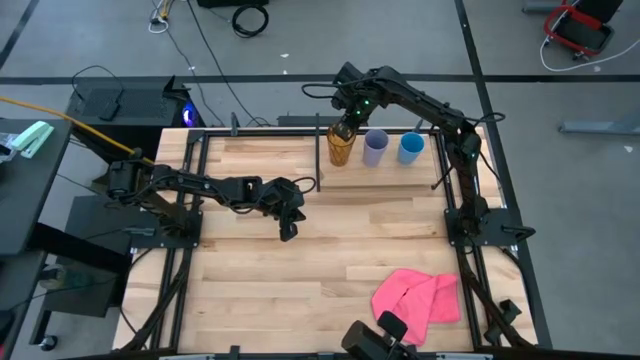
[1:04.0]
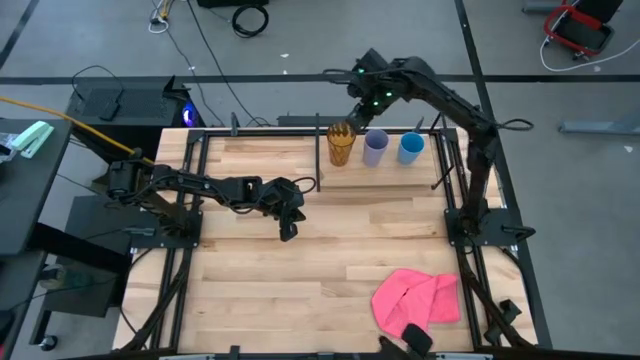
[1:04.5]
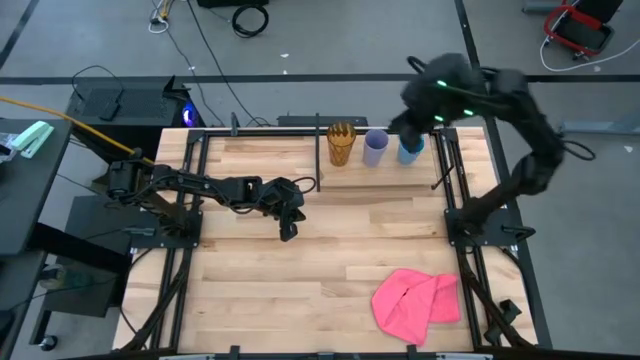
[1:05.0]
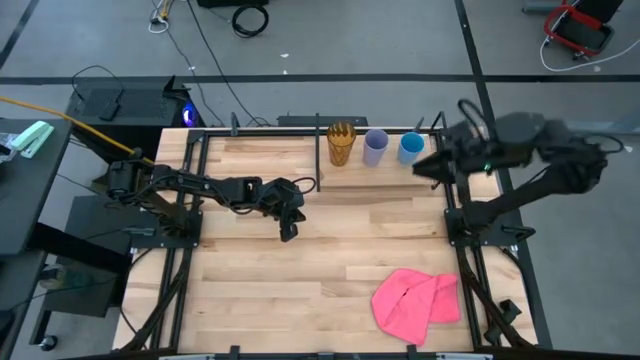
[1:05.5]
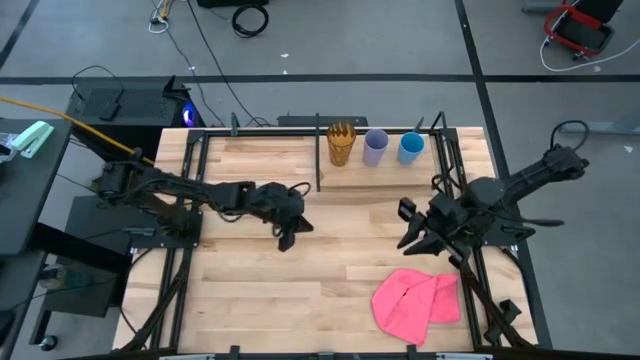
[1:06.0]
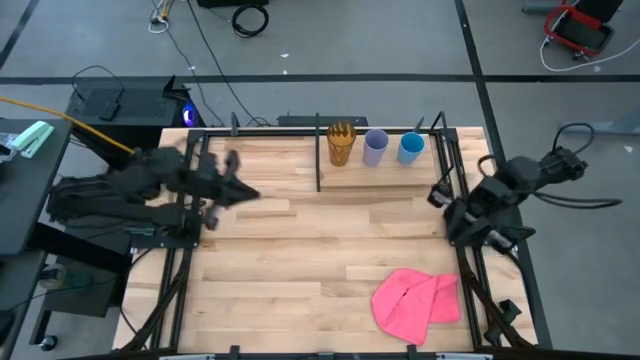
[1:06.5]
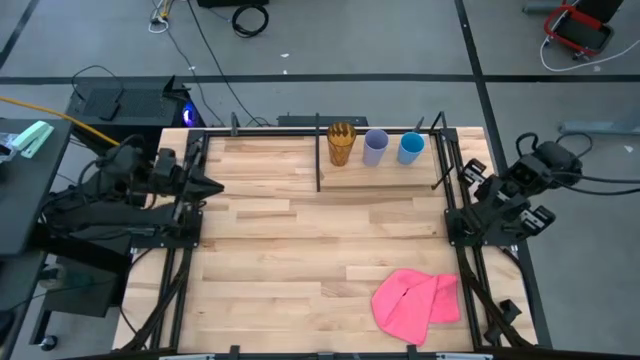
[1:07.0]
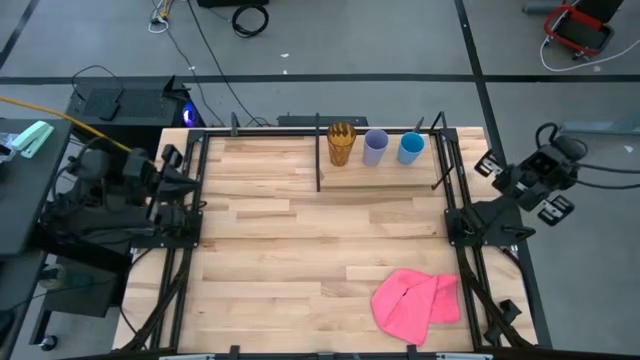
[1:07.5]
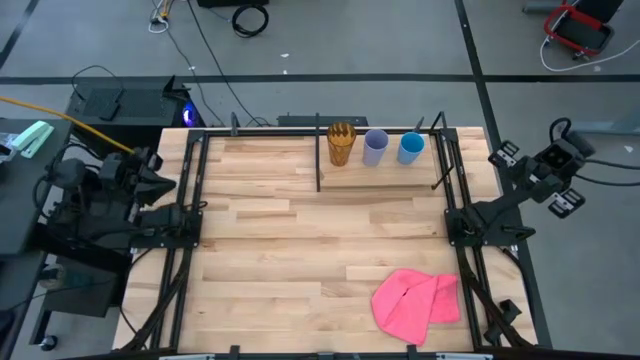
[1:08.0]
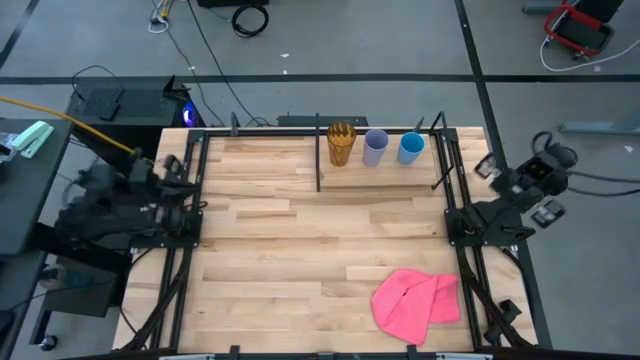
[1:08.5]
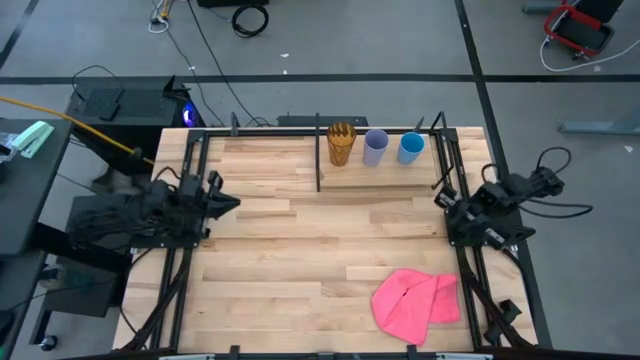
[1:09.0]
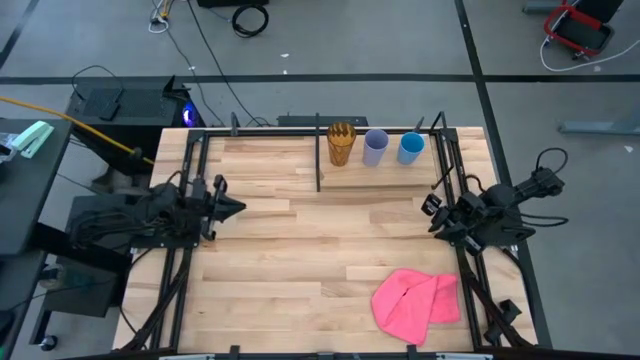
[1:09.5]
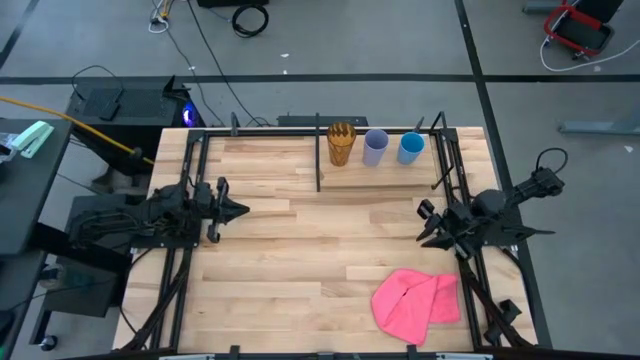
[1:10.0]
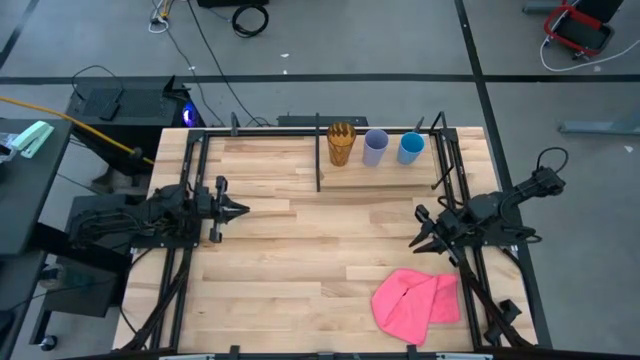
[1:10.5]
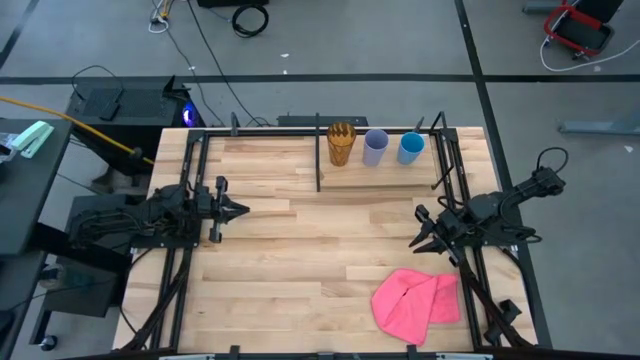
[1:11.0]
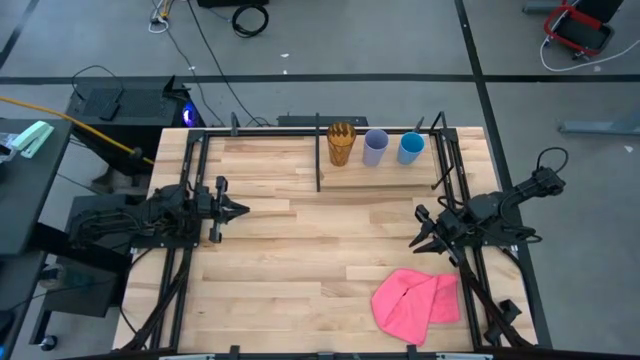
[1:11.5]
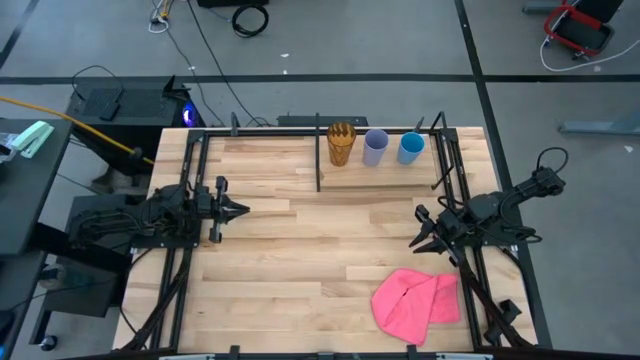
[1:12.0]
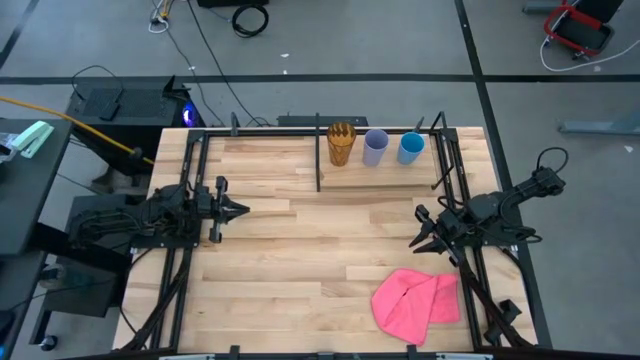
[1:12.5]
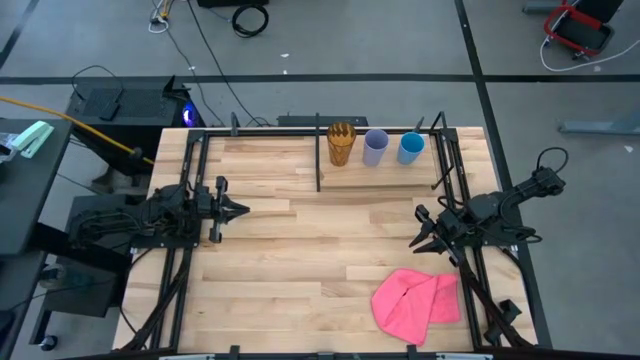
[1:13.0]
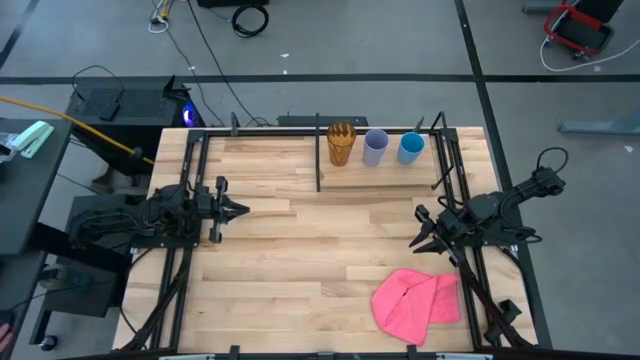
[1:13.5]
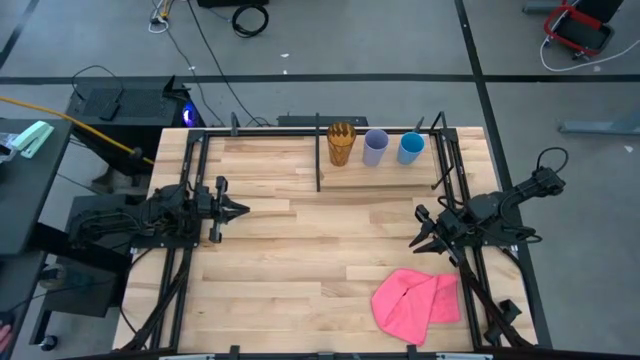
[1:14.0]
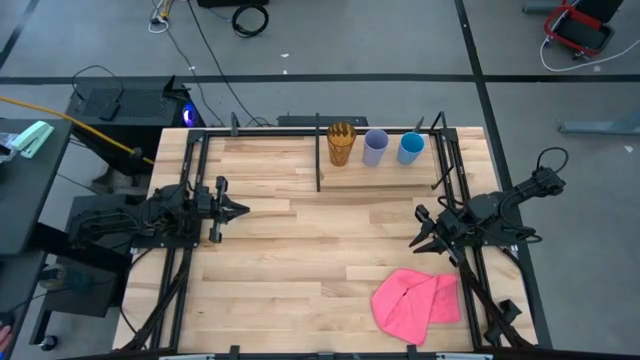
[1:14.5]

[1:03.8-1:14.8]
Task: Stack small to large cups/mugs on shelf
Return to Home Position

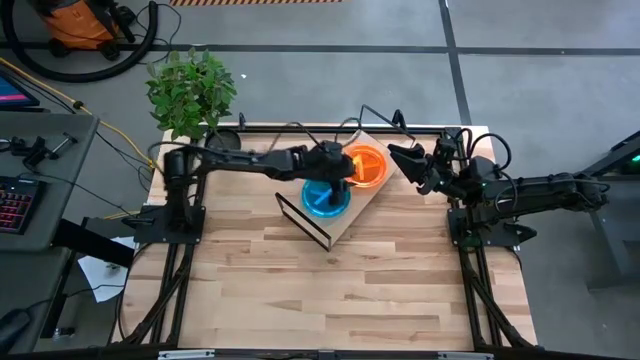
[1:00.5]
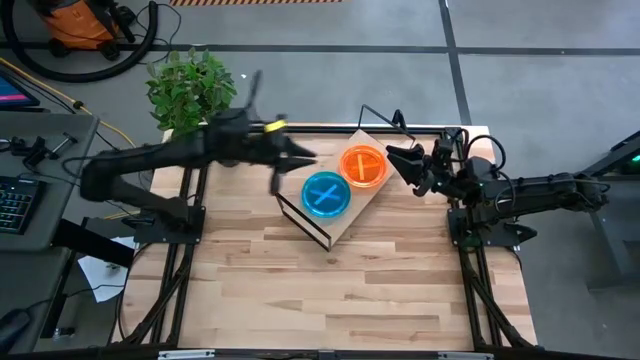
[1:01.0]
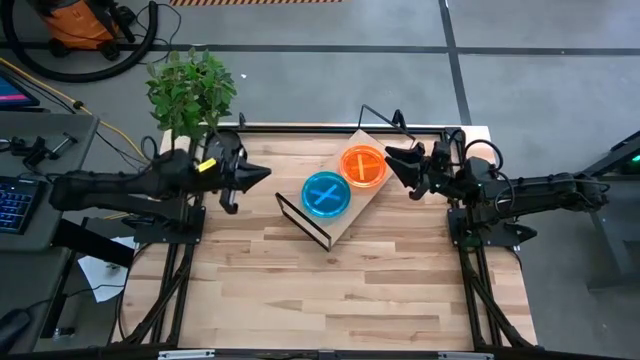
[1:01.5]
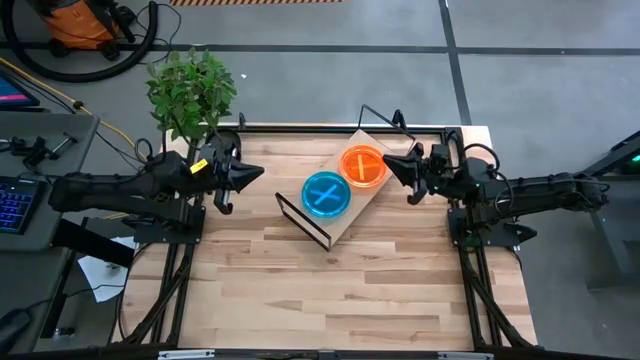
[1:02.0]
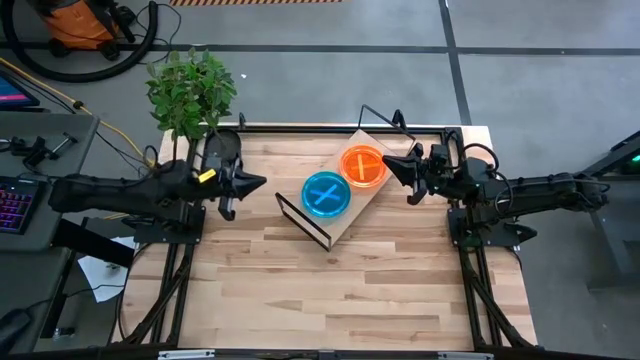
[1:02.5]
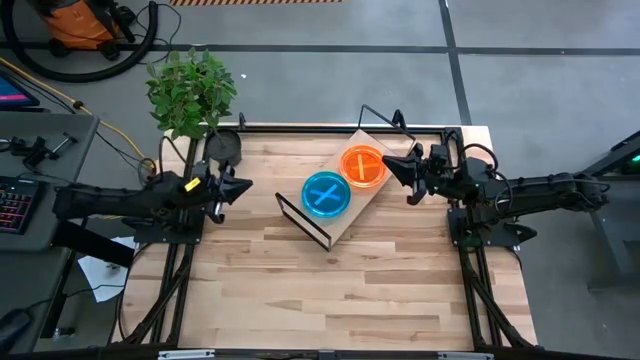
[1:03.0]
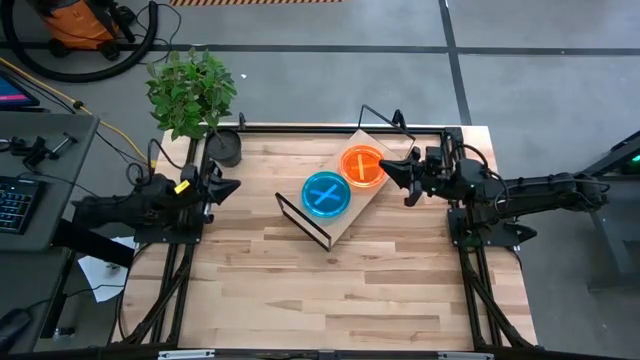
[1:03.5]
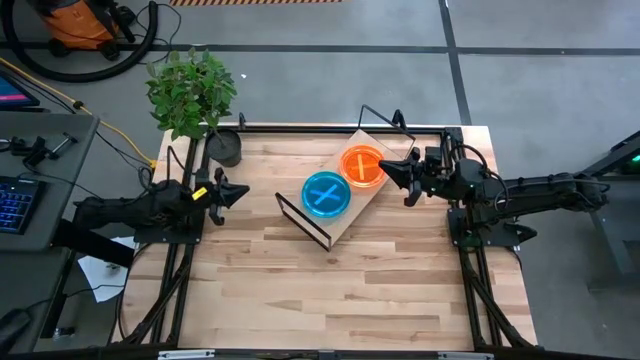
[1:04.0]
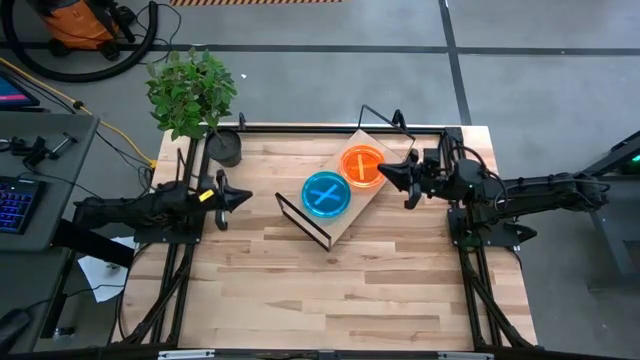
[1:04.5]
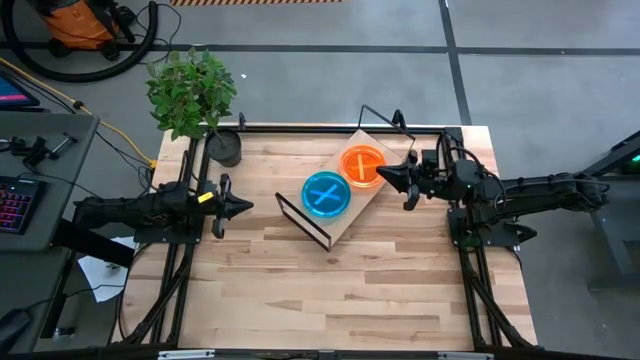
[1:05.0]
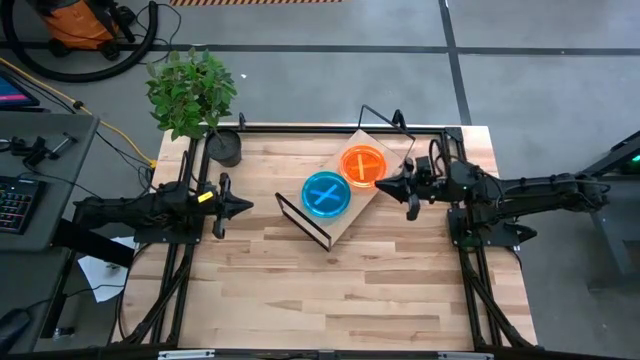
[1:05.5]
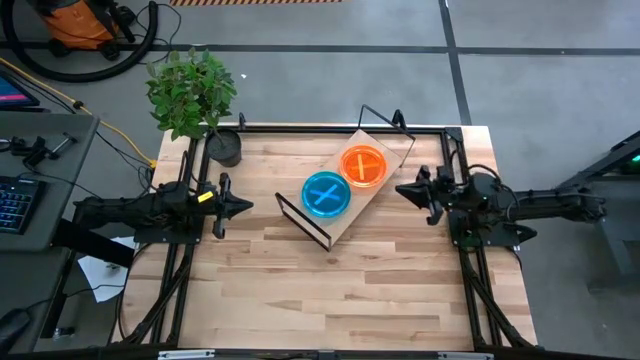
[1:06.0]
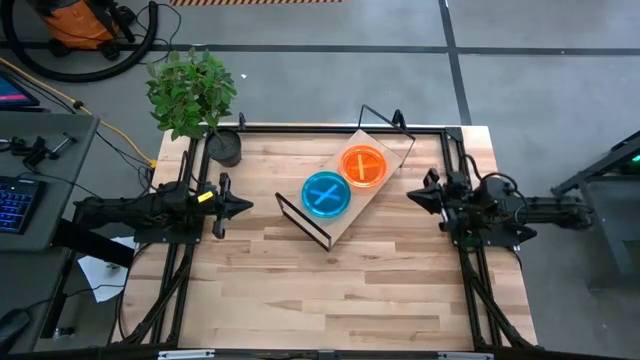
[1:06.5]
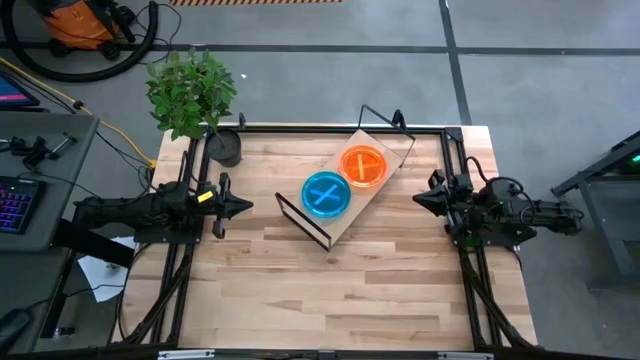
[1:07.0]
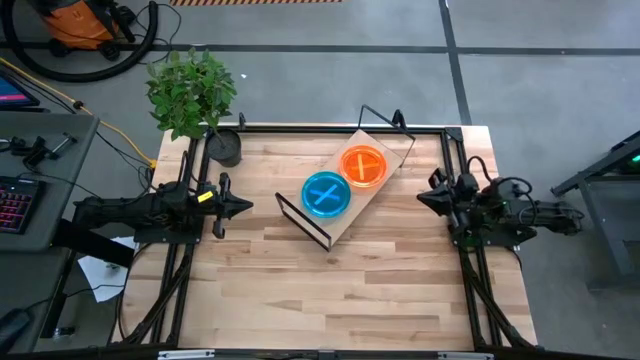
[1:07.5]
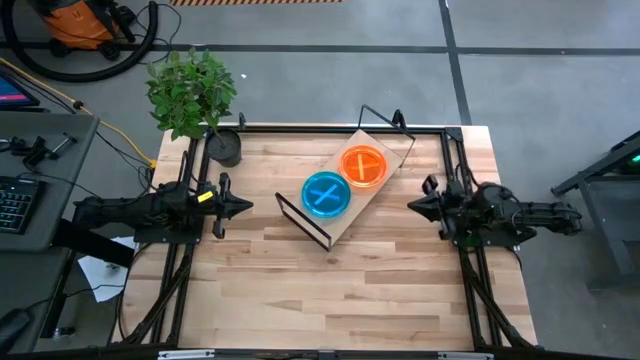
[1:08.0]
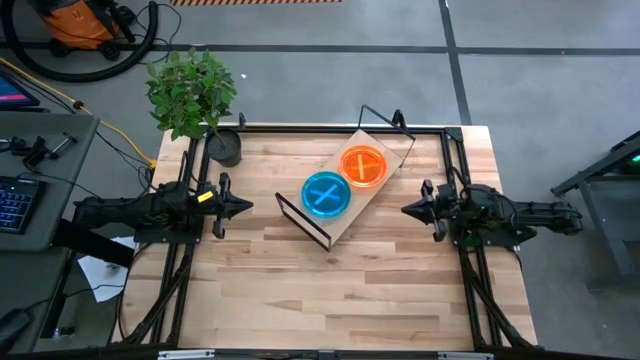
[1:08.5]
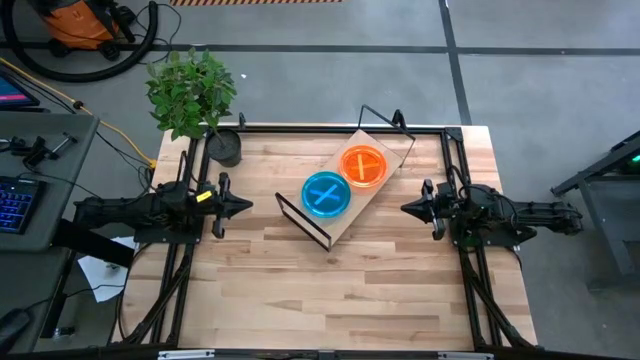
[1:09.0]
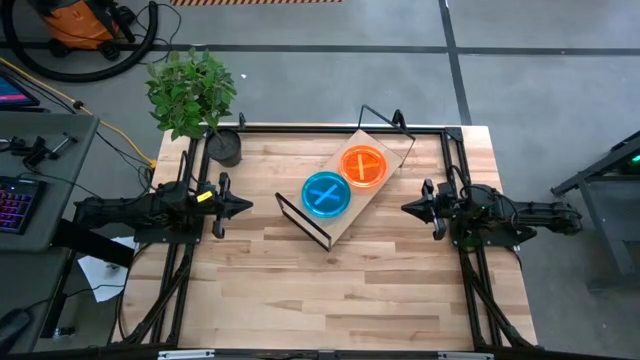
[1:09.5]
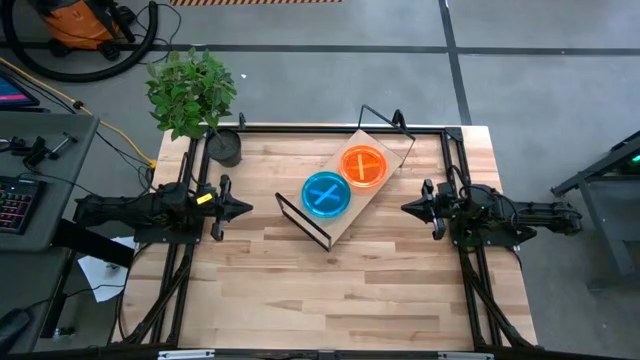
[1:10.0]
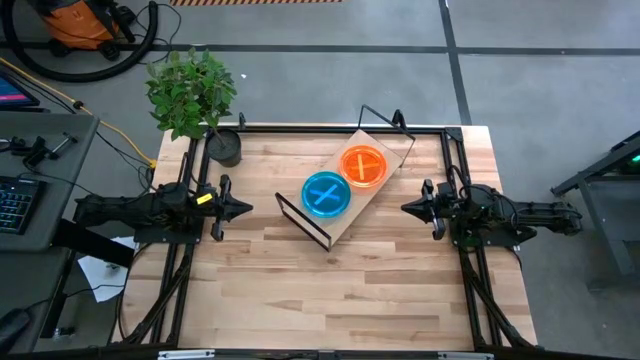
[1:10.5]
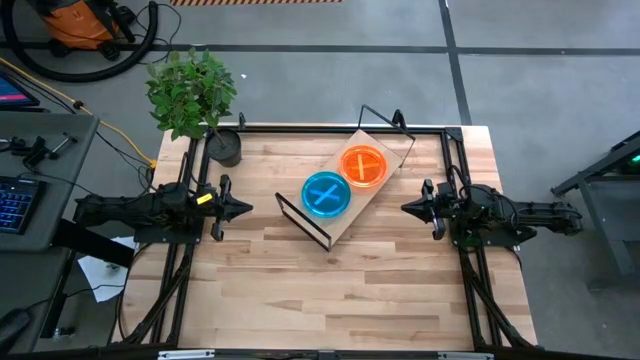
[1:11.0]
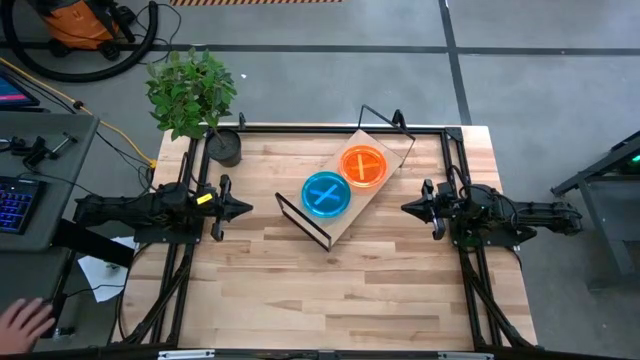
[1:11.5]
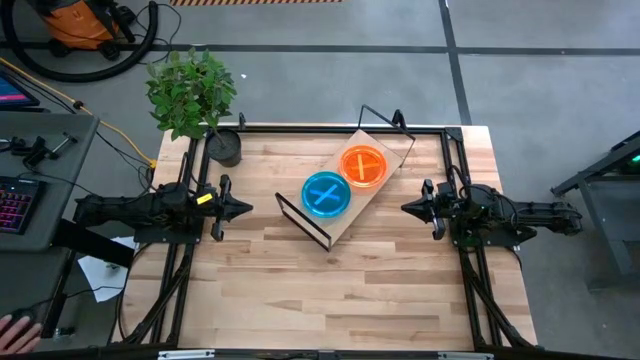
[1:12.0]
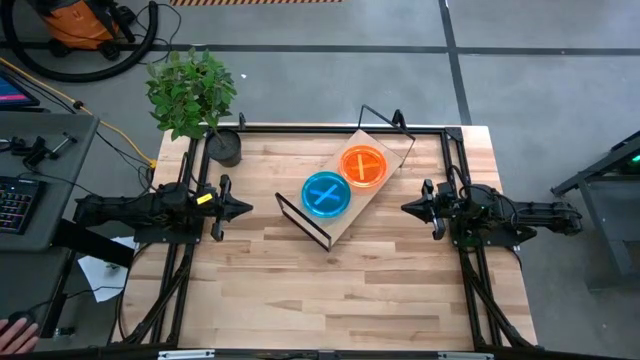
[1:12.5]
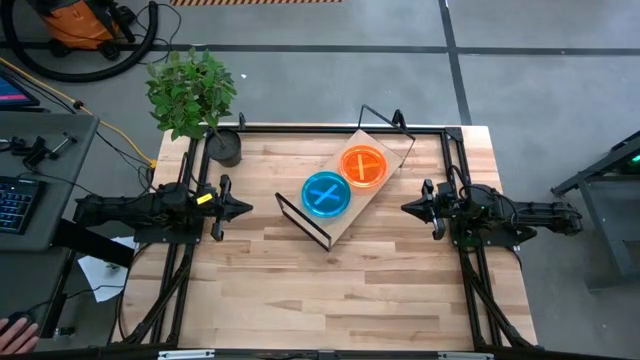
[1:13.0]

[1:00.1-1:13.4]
Task: Place and stack plates onto a shelf
Return to Home Position
